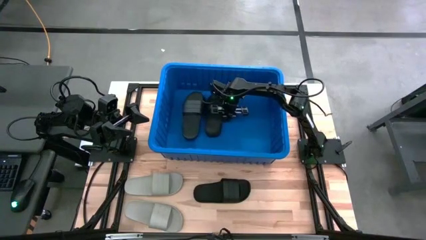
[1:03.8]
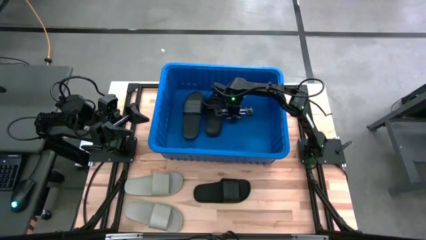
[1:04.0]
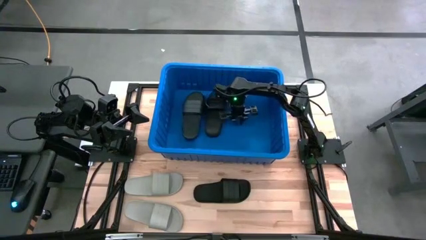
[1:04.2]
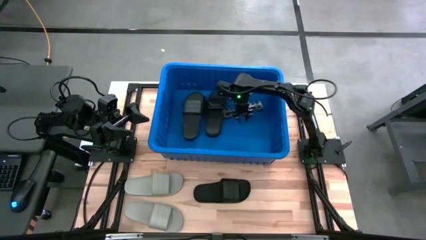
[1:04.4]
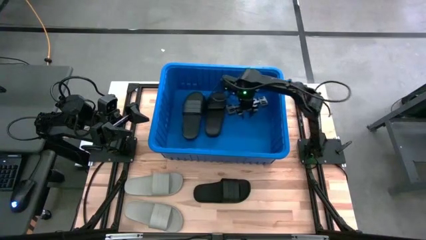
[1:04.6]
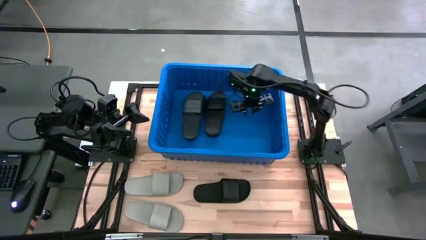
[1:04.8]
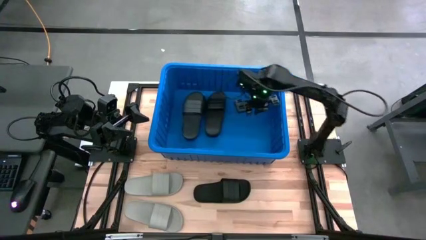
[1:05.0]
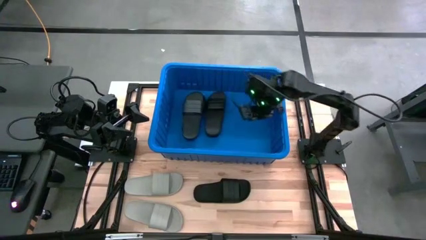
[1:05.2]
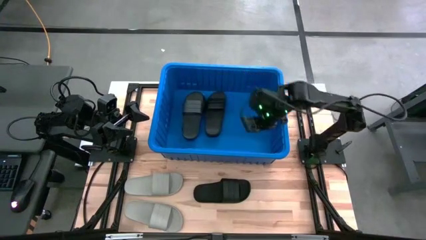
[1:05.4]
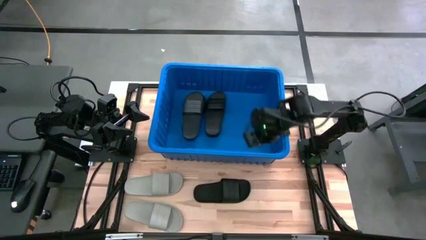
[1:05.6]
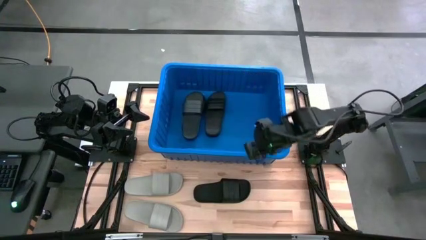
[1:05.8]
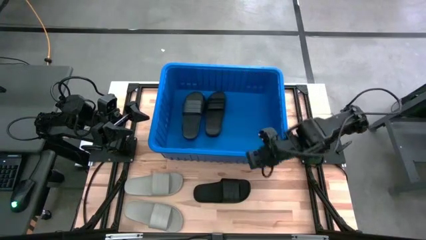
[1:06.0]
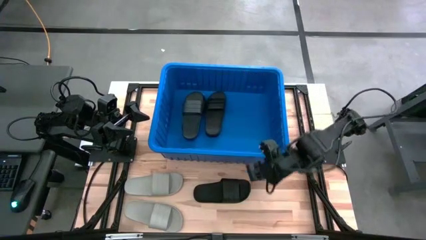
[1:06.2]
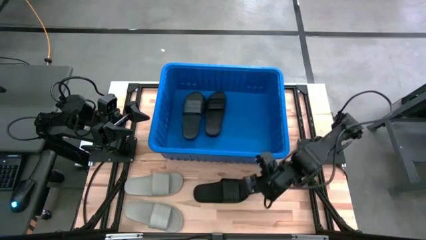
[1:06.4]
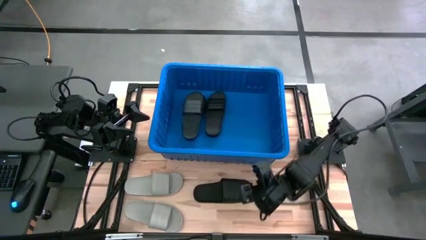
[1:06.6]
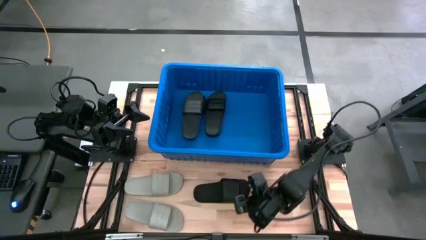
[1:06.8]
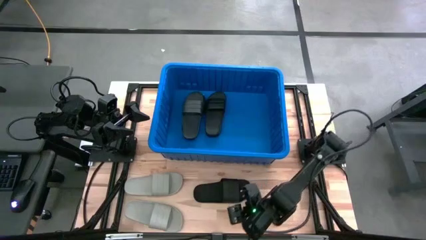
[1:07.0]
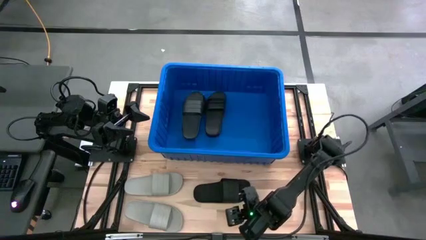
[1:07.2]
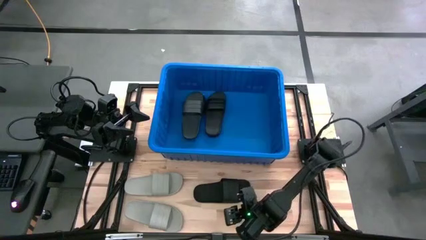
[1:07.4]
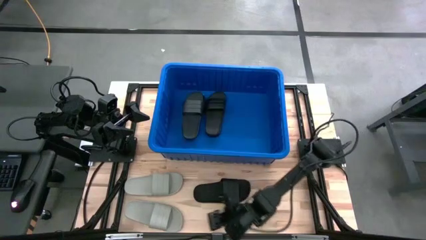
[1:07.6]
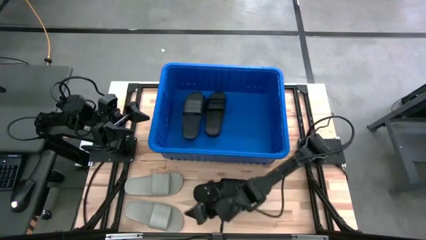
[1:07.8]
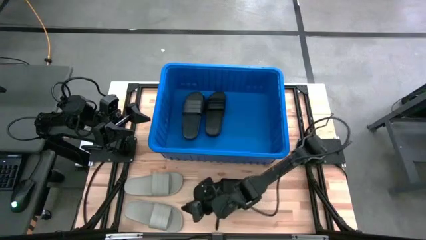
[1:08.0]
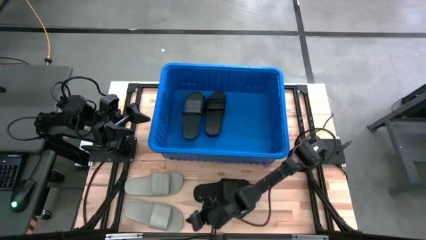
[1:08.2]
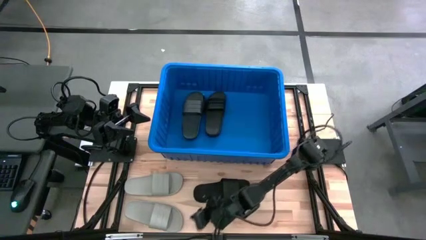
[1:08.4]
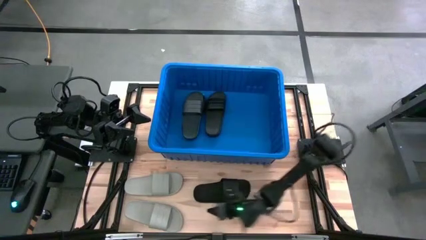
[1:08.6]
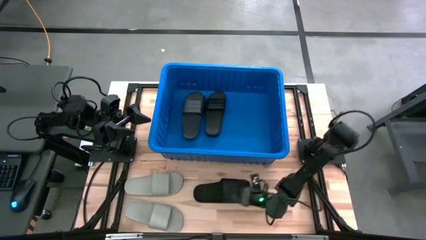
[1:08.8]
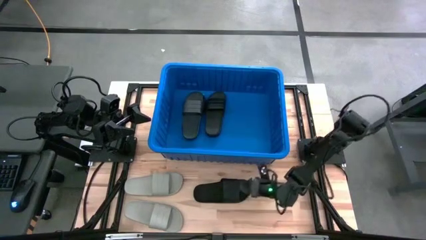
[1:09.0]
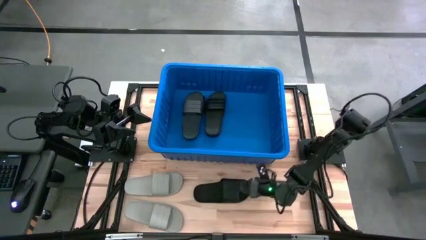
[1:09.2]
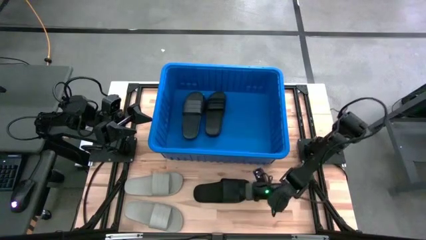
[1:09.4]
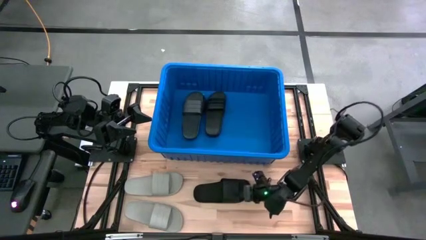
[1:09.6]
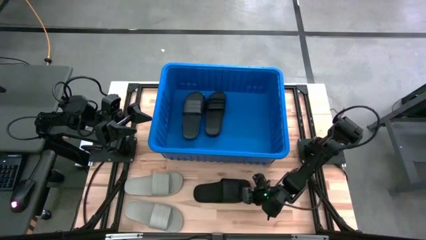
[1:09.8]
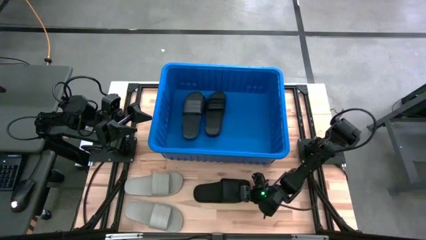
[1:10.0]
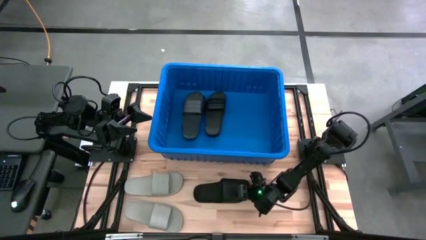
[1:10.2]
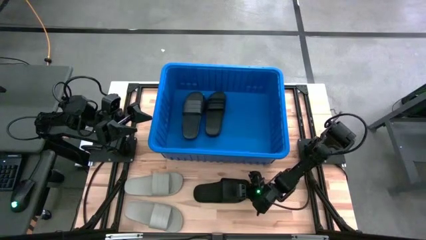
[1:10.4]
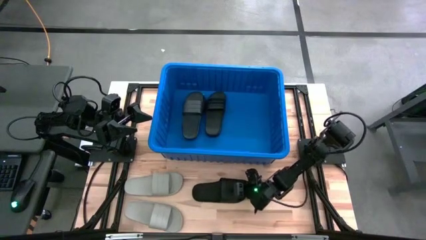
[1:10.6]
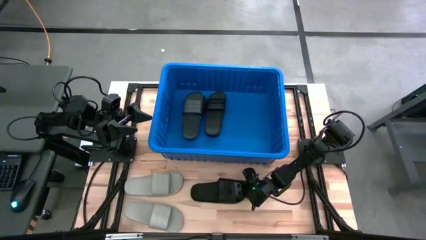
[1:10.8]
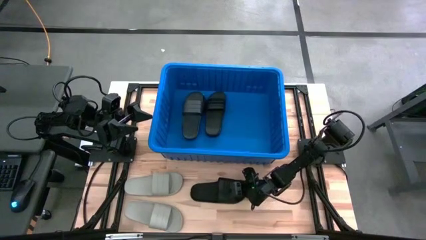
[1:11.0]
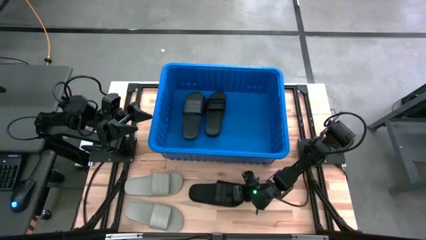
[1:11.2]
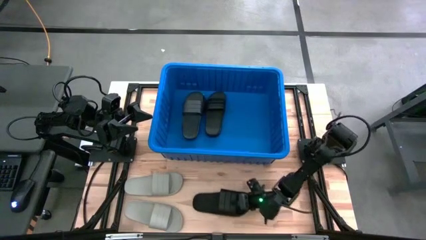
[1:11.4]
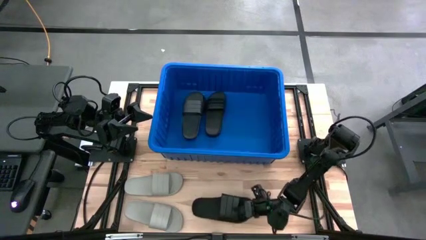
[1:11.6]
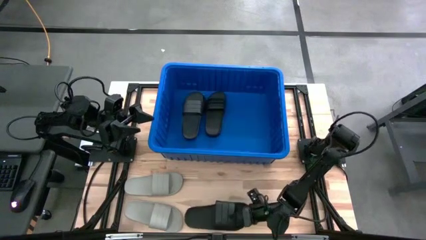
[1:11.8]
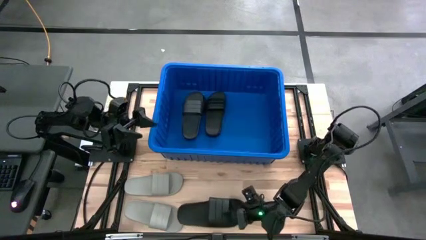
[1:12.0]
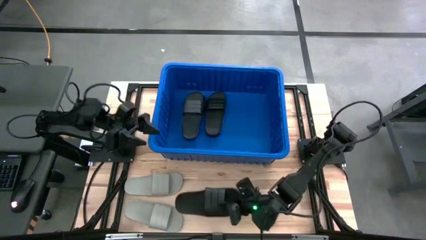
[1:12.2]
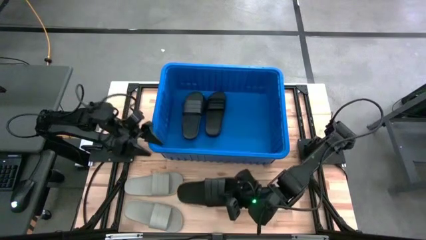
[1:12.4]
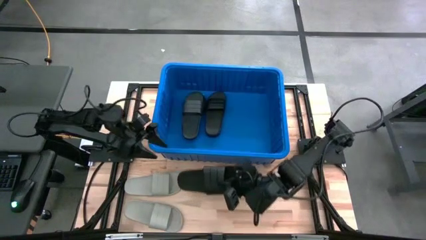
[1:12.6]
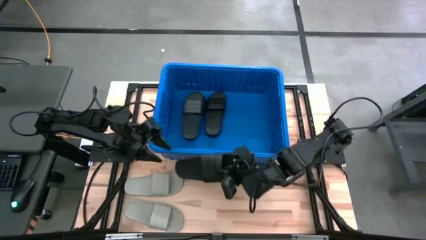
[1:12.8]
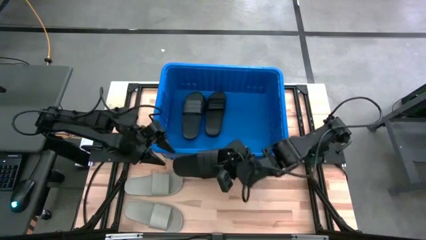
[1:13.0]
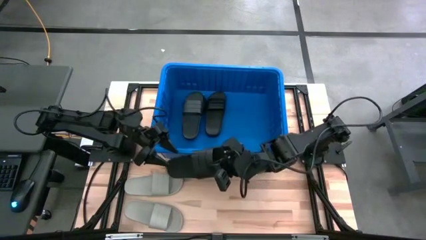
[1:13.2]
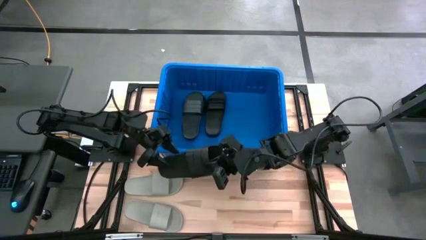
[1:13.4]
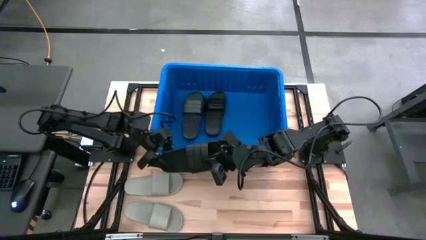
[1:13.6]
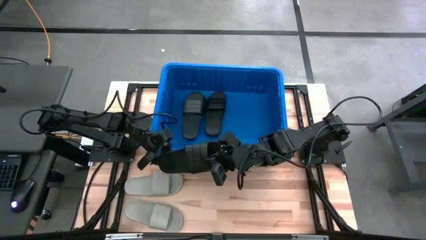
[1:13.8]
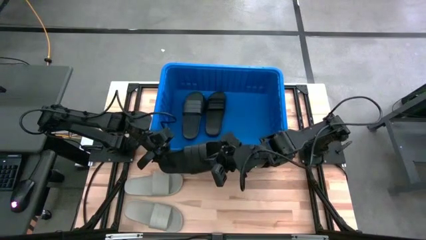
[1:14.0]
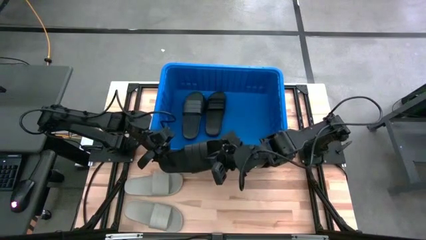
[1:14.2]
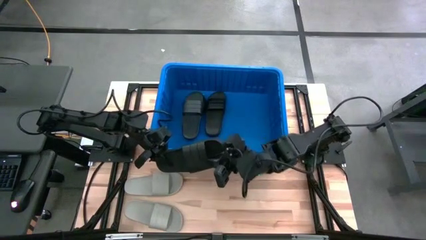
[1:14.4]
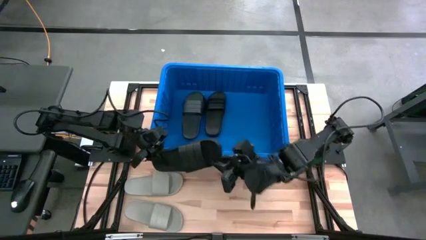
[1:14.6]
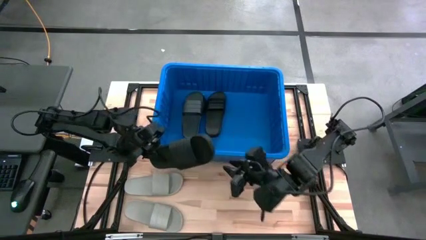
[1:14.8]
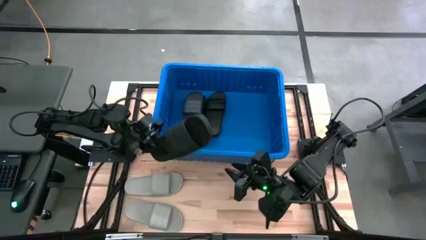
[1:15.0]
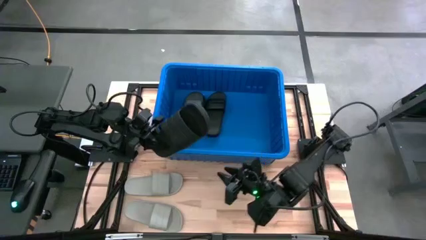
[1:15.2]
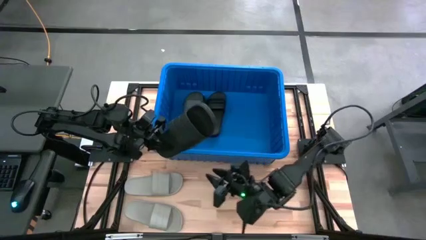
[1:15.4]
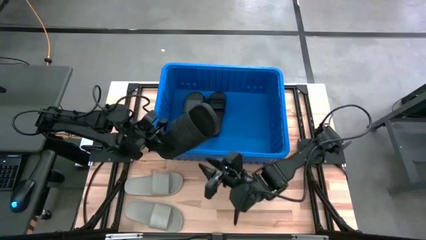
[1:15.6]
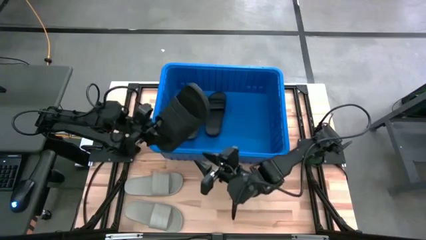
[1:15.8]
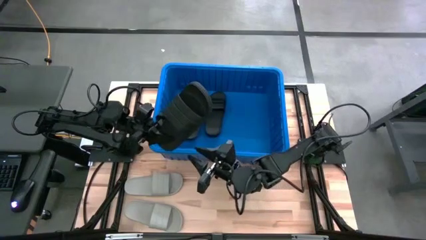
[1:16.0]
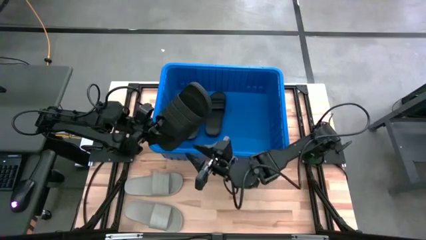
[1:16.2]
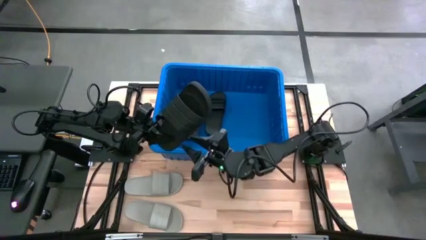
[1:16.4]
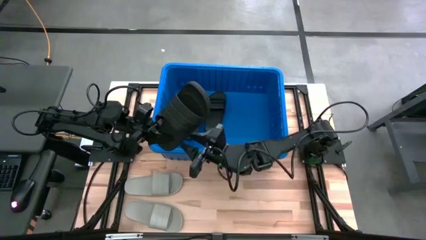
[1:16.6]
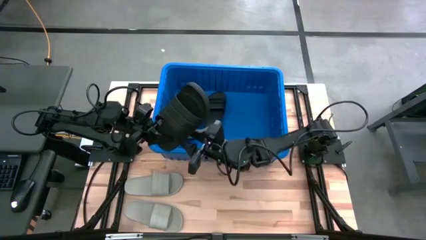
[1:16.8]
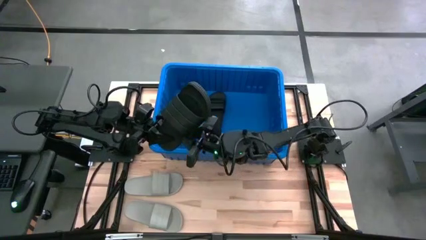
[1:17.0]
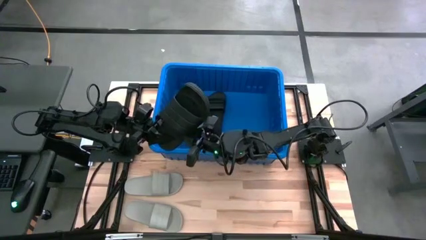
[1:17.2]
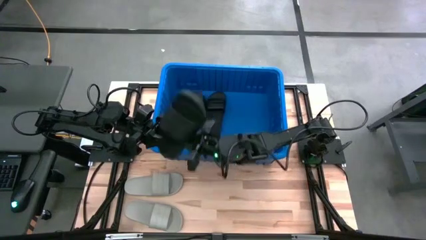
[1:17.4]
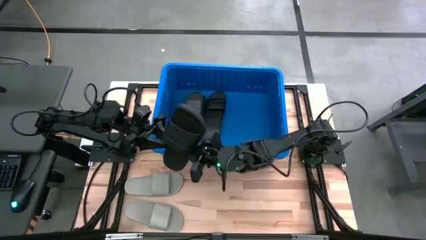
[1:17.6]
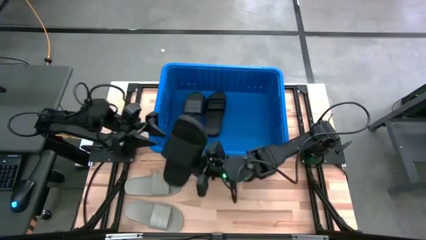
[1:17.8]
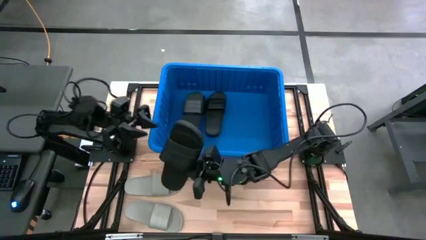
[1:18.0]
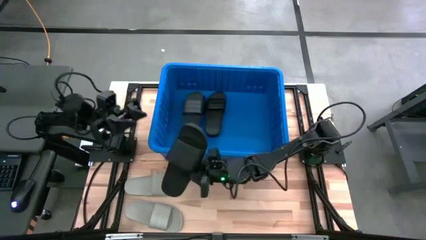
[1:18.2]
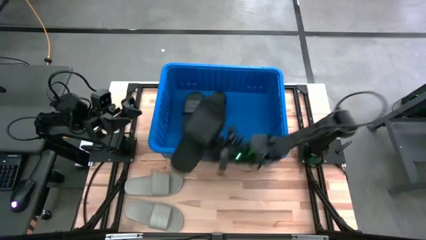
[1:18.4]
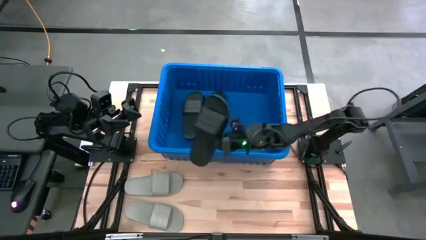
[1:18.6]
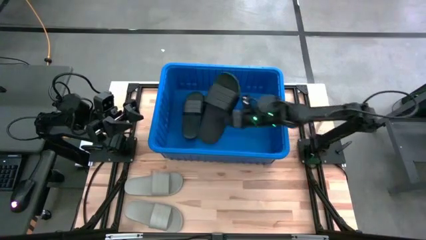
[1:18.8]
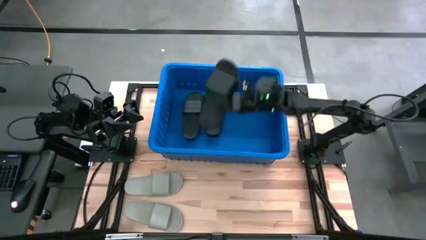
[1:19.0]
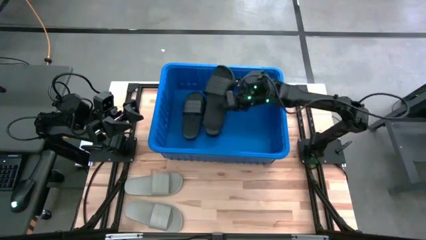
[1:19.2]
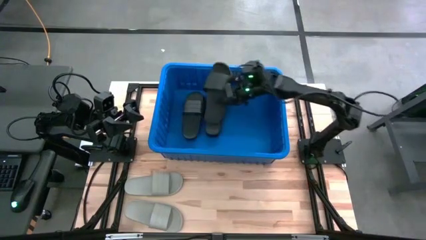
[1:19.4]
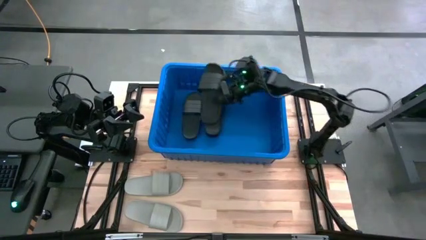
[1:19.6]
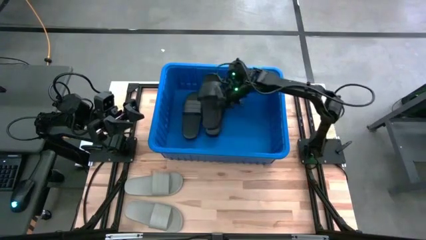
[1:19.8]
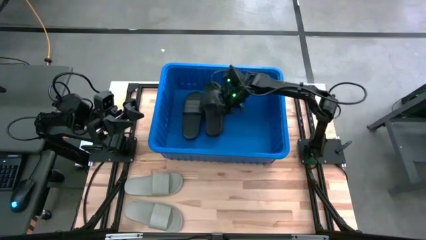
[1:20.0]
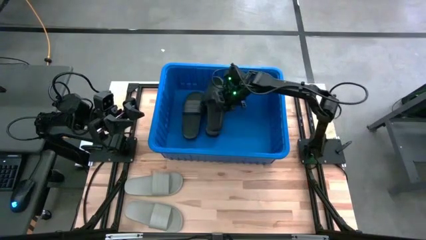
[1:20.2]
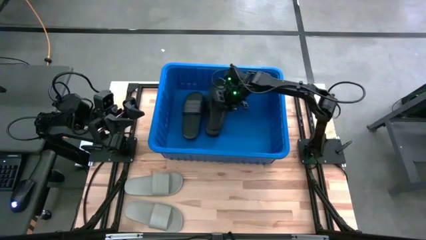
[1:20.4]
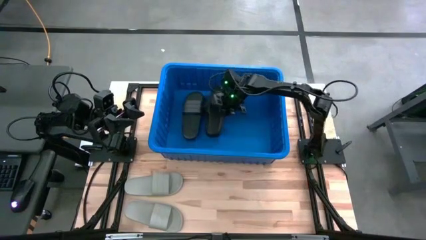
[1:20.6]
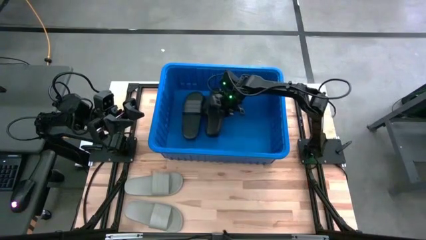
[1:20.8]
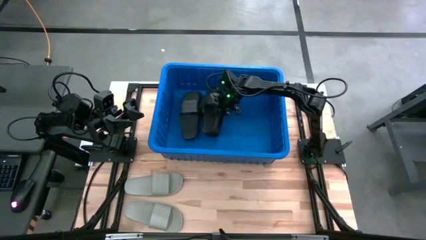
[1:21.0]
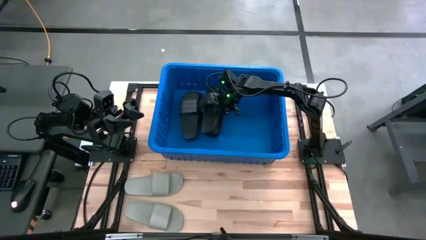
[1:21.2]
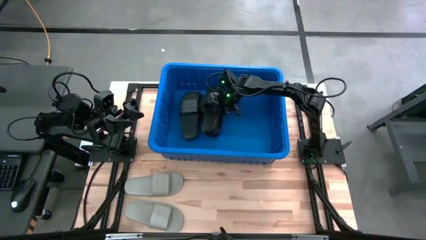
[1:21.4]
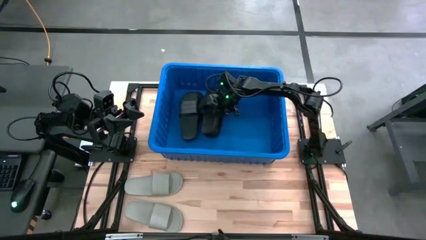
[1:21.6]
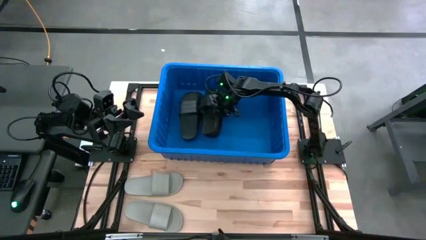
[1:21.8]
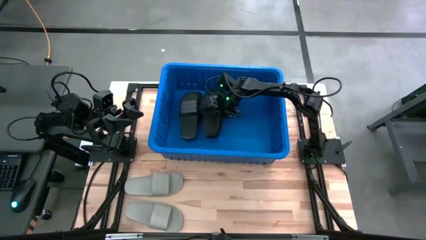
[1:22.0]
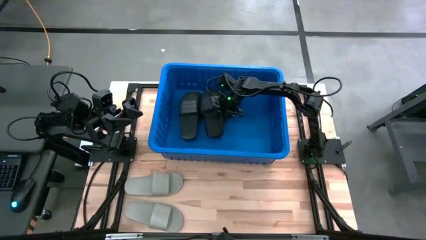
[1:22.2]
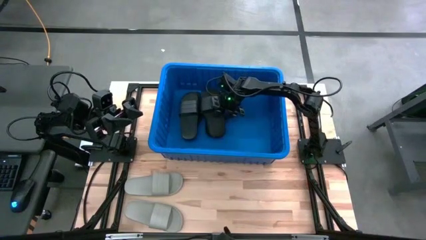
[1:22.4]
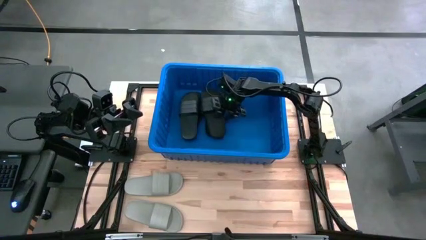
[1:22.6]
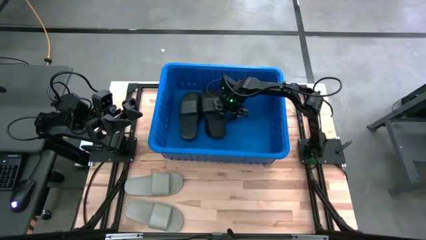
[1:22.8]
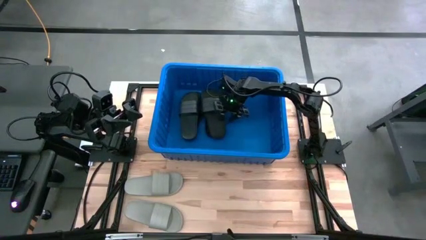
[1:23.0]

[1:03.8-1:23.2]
Task: Pick and place slides into bin
Put the black slide into the blue bin
